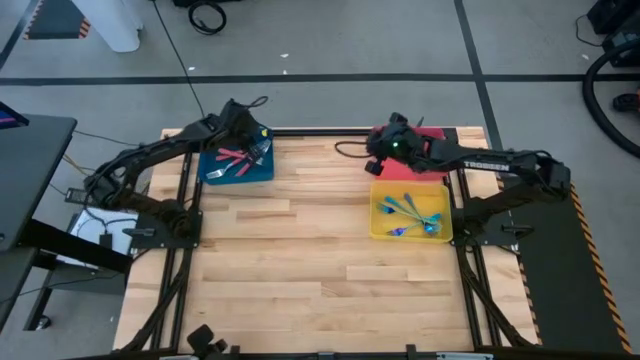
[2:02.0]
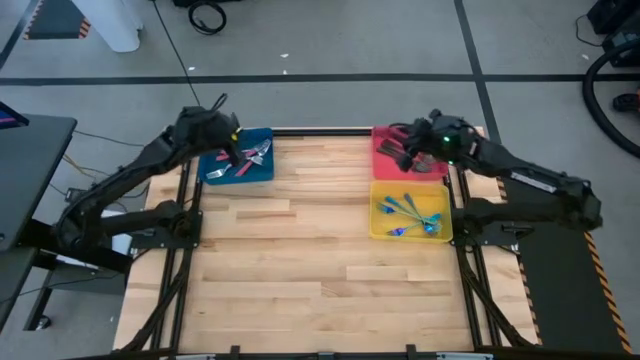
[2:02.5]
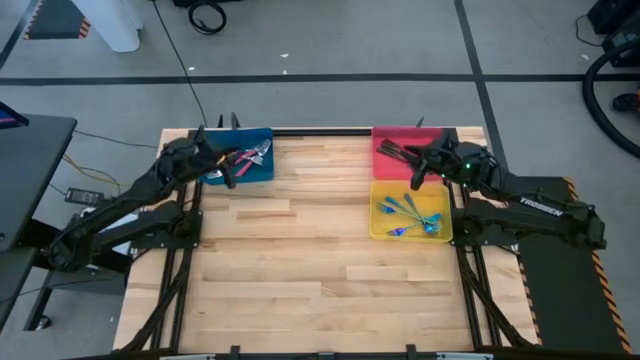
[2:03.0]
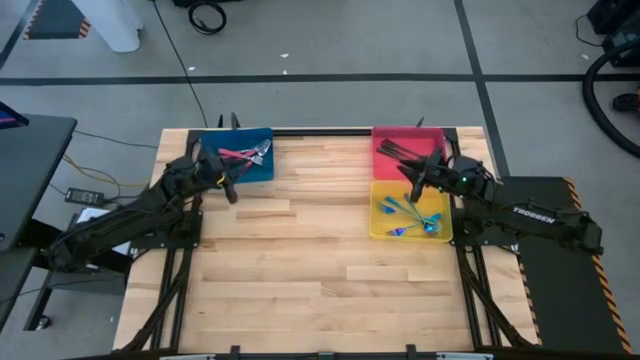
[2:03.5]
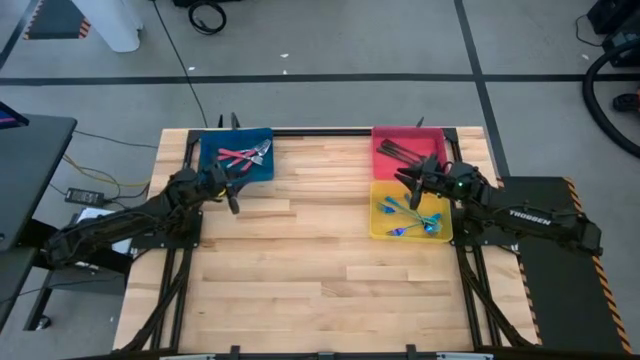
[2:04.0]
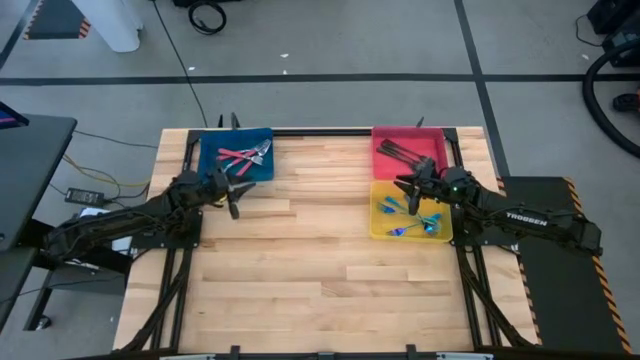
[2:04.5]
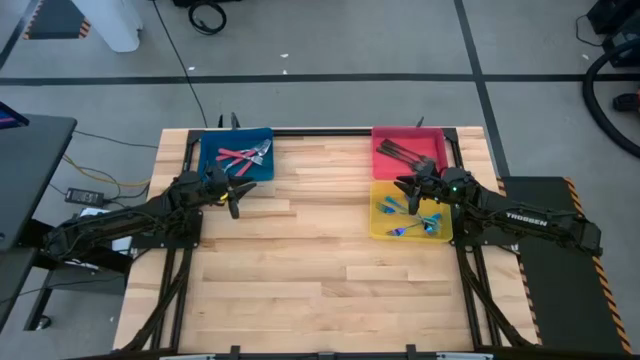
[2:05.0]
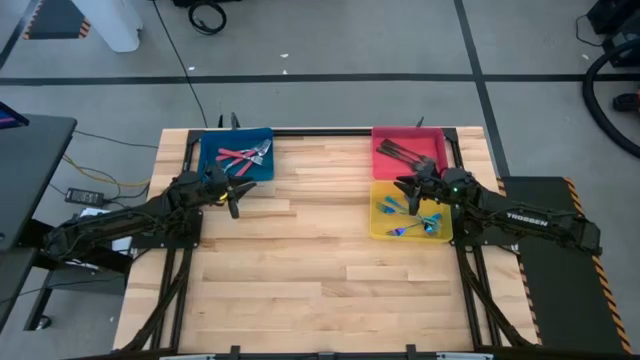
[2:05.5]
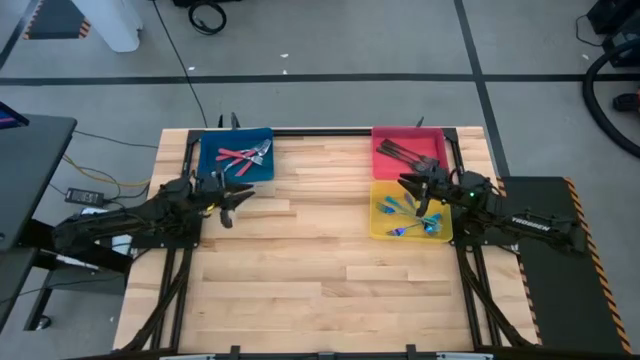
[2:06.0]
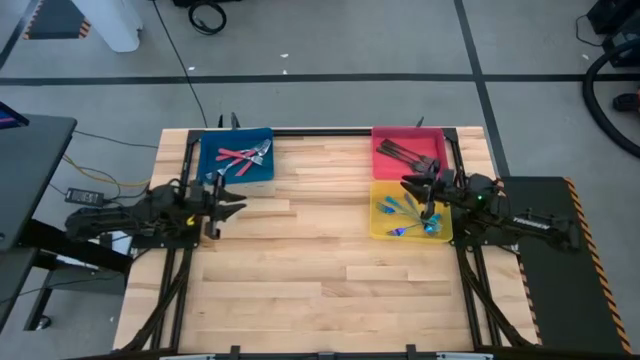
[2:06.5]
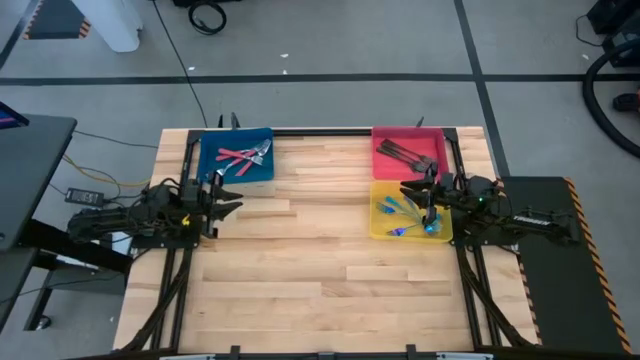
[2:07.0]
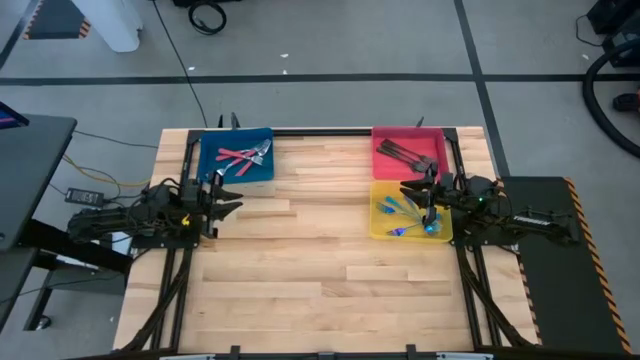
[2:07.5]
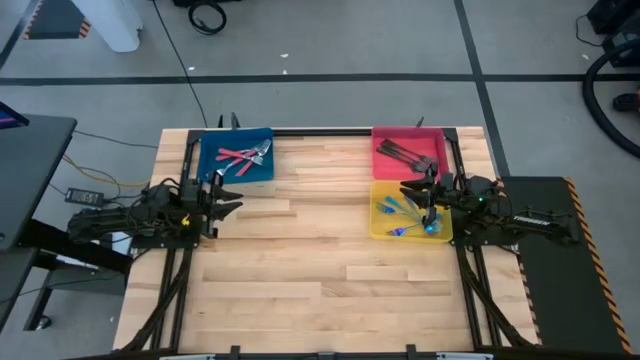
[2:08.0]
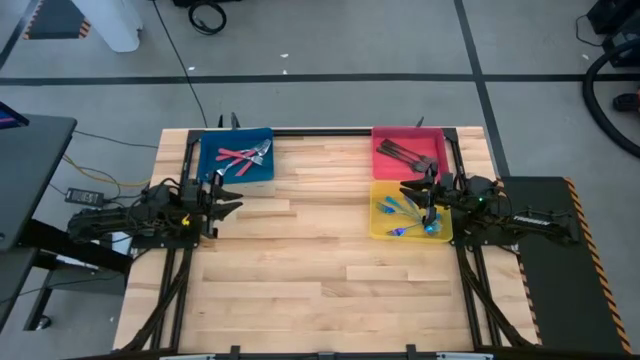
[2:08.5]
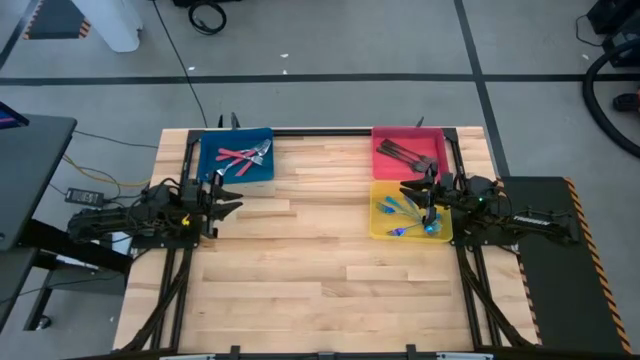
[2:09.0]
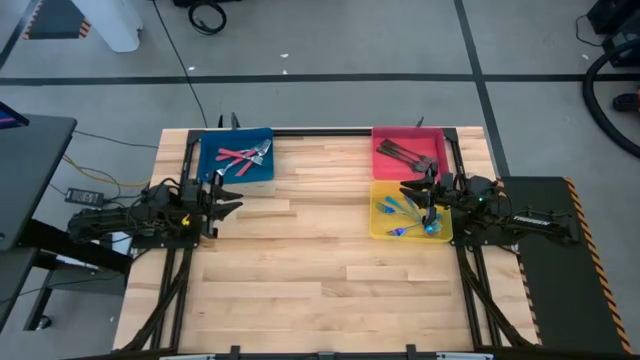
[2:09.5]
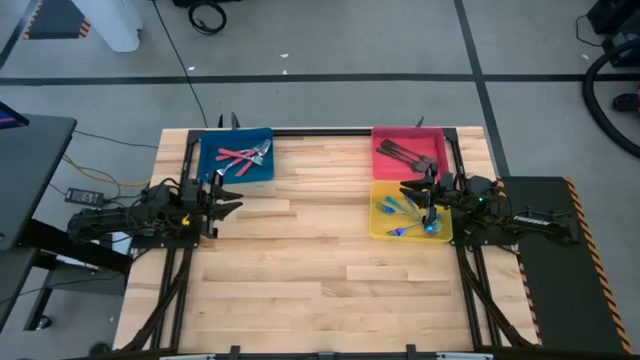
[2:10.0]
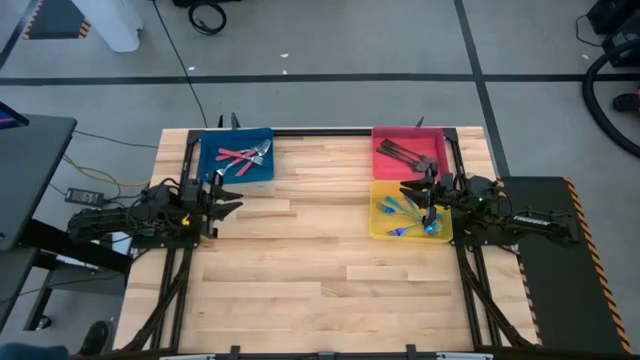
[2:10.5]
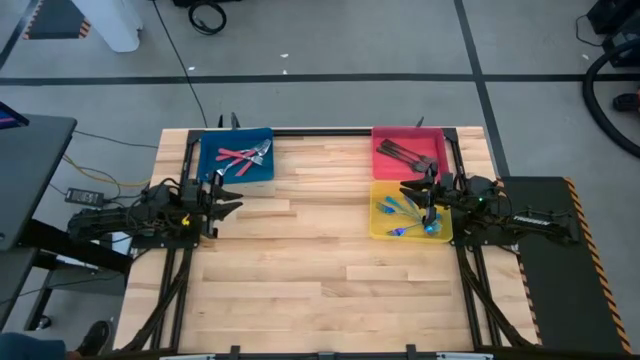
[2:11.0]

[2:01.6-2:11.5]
Task: Sort silverware by color (type)
Return to Home Position

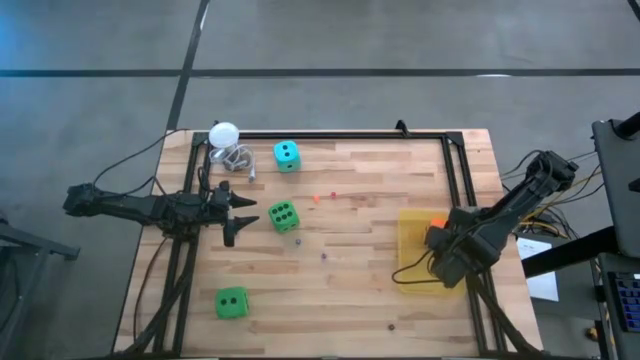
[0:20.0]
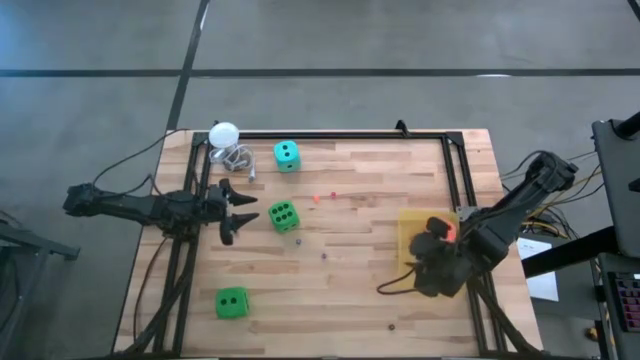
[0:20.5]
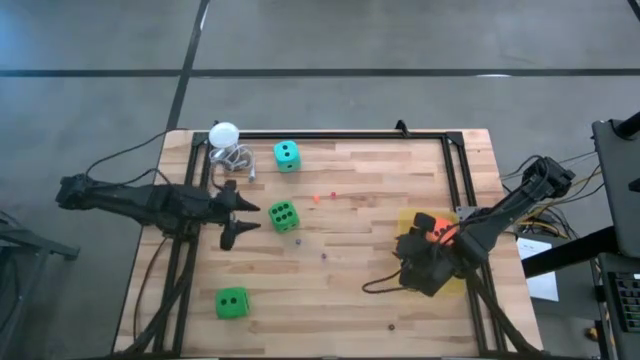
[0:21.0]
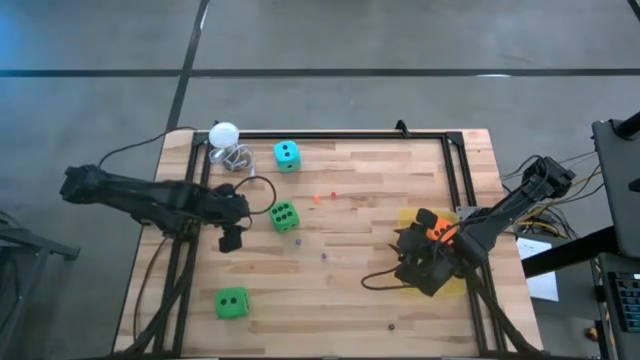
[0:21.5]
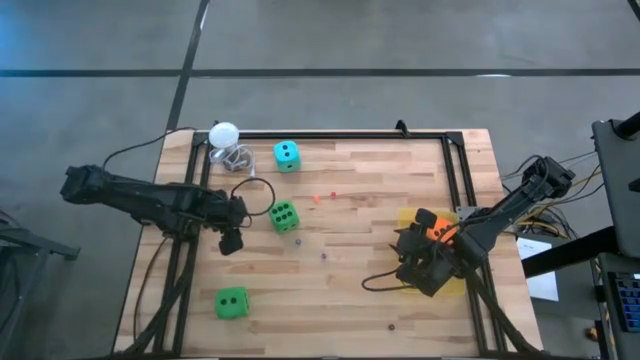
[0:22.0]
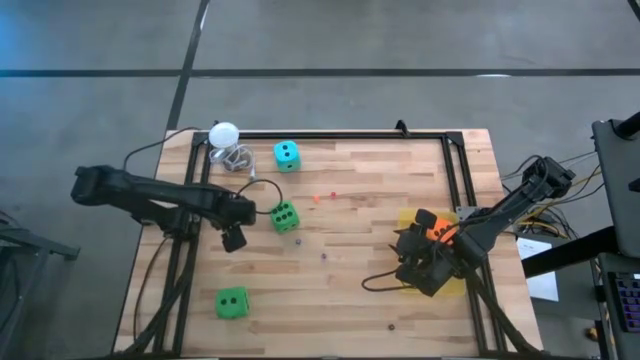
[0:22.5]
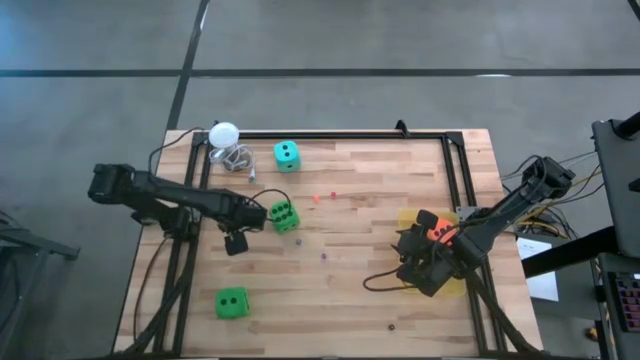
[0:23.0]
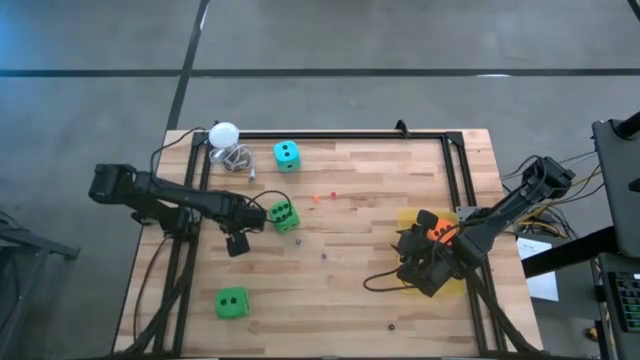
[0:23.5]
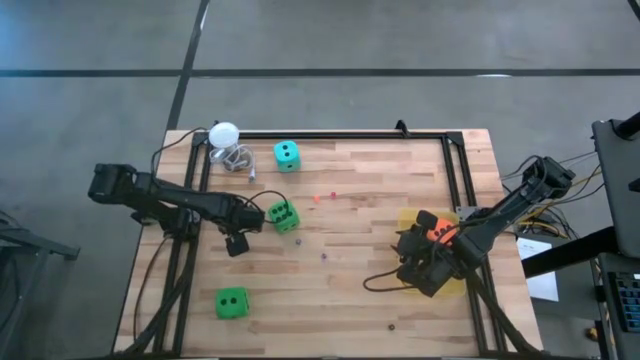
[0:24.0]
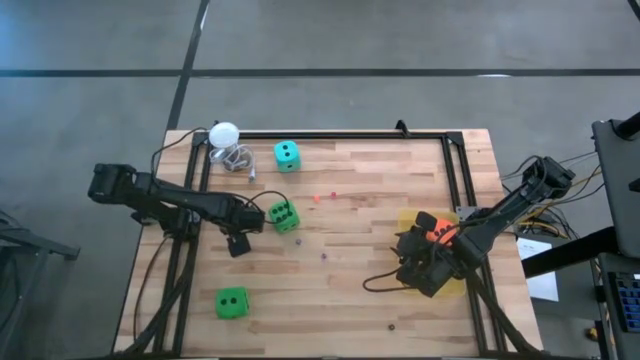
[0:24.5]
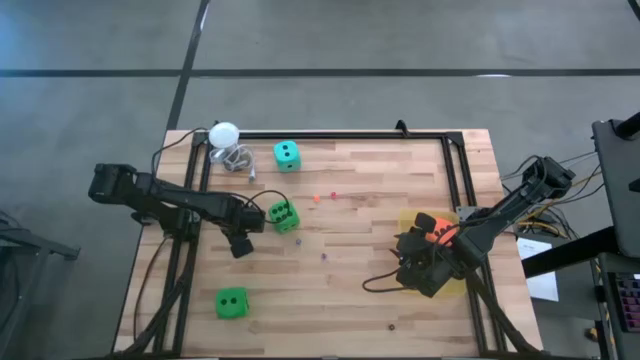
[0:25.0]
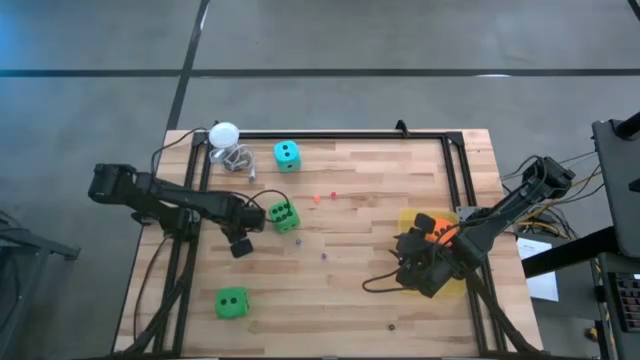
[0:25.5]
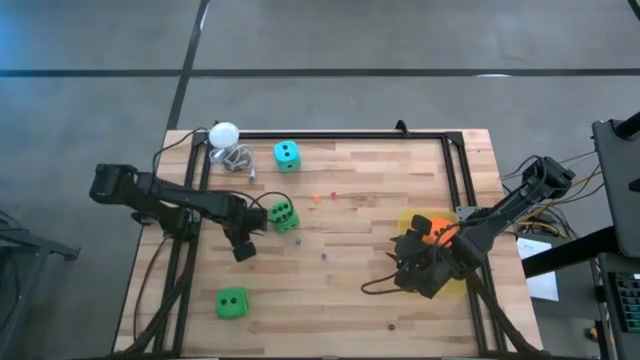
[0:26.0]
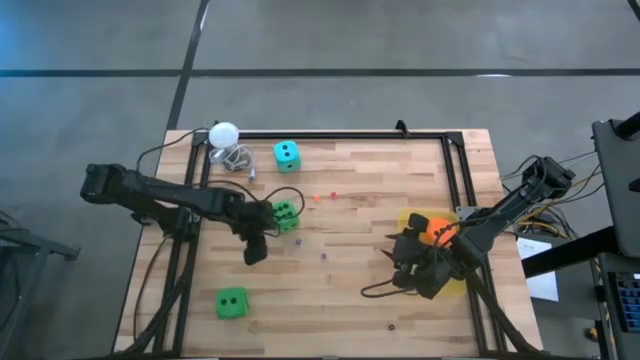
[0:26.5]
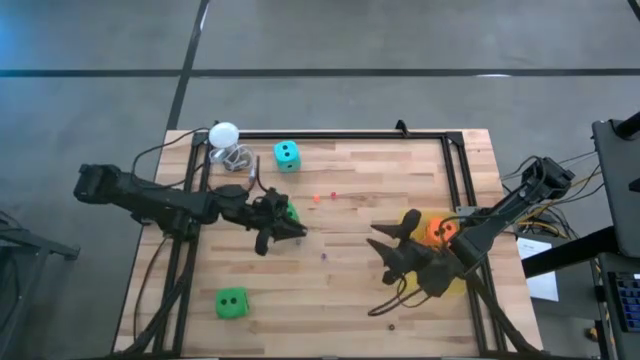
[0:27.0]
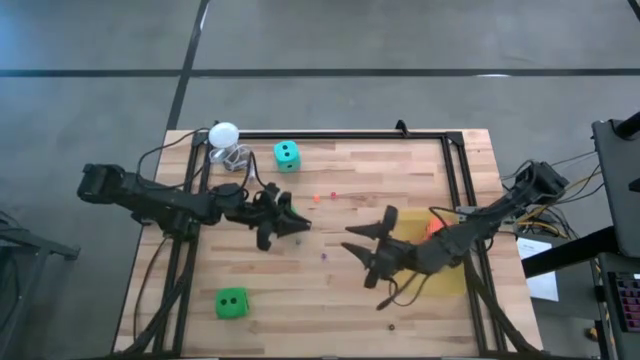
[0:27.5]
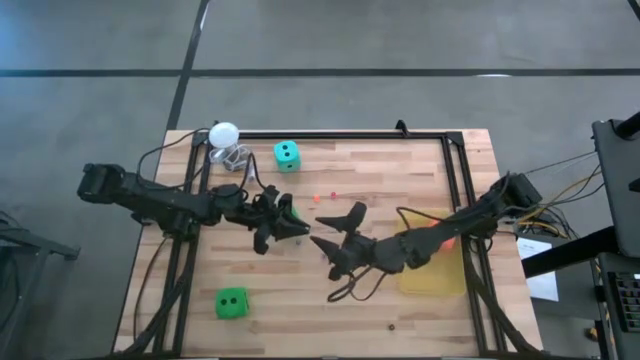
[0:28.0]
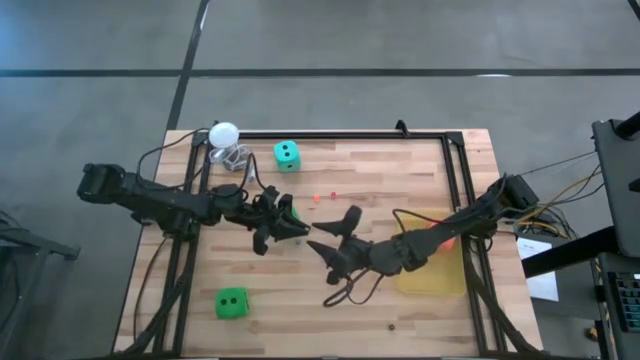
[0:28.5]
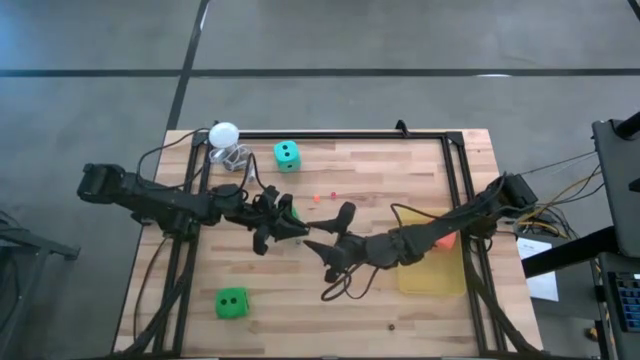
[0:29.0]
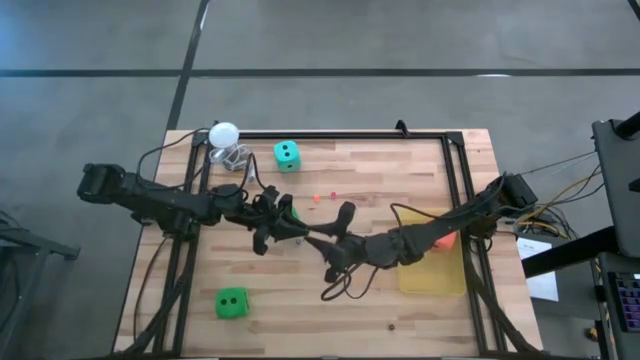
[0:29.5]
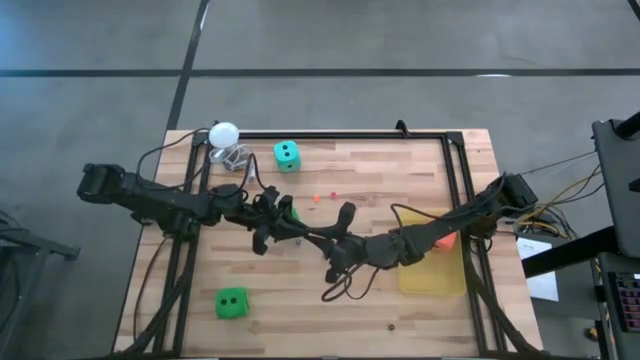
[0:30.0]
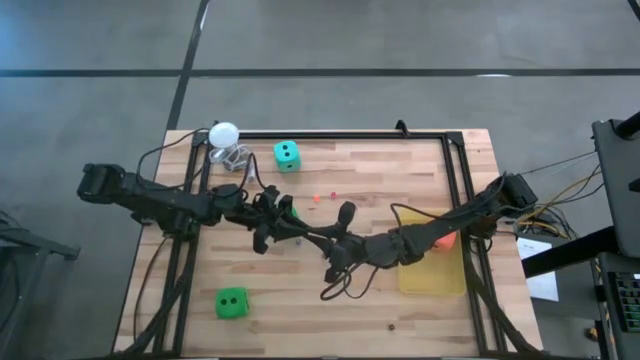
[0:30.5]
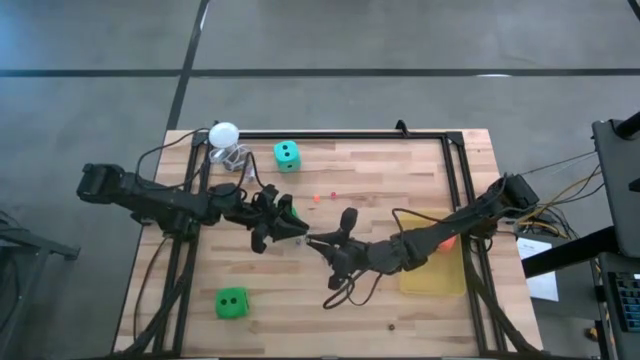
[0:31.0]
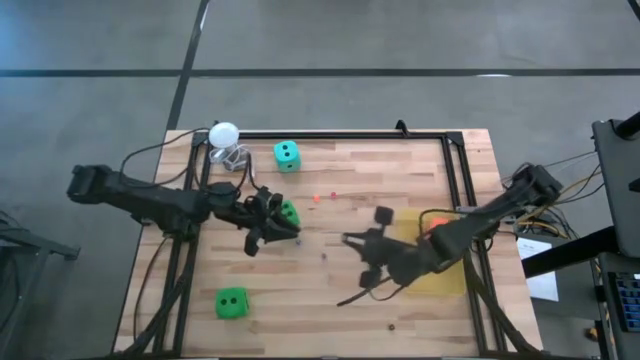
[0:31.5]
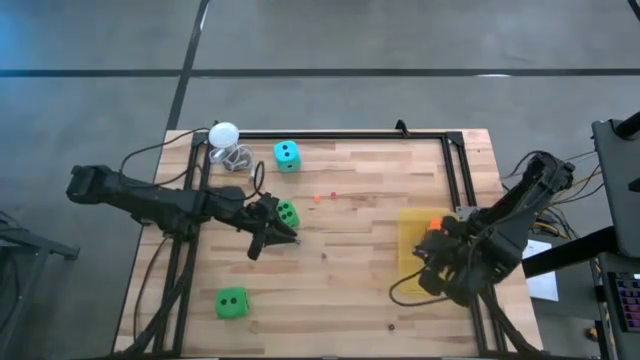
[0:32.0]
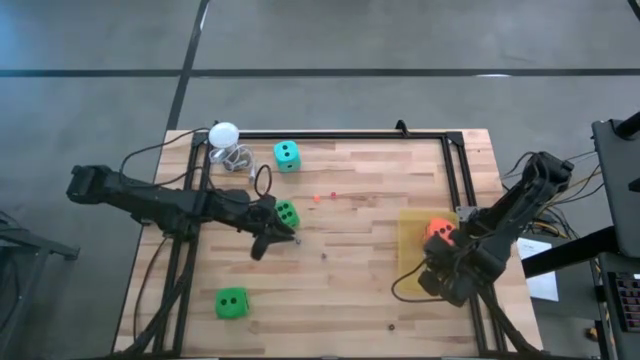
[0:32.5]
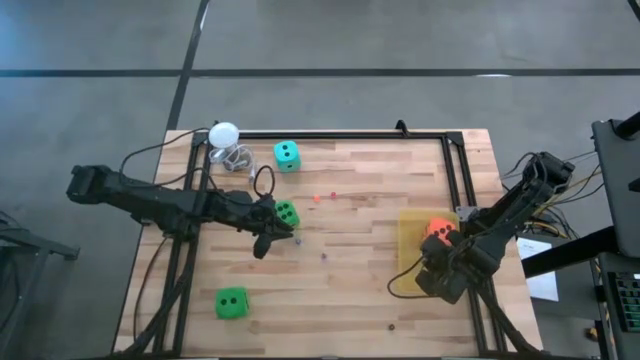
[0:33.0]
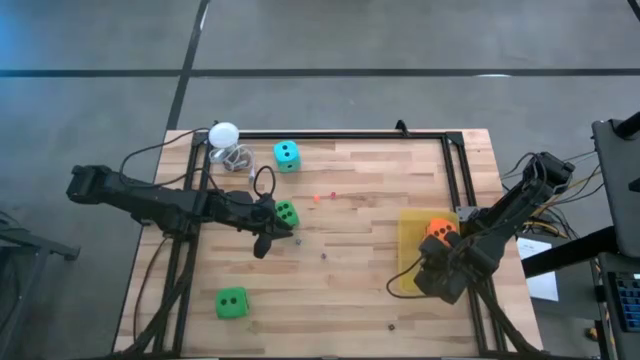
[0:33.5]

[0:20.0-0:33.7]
Task: Pick & Place Dice
Put the top small black dice into the yellow bin
